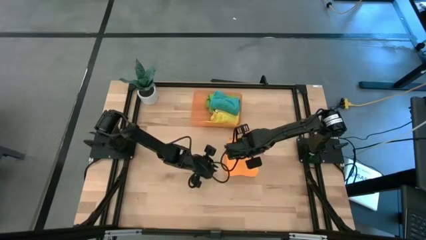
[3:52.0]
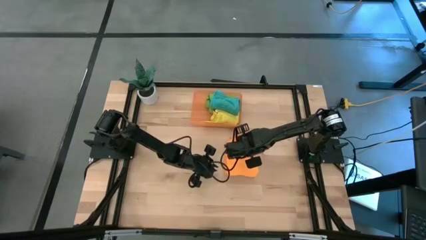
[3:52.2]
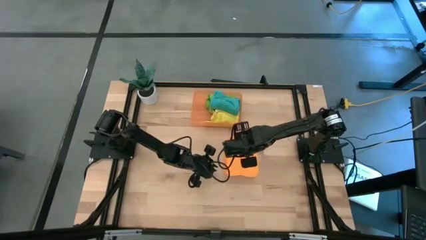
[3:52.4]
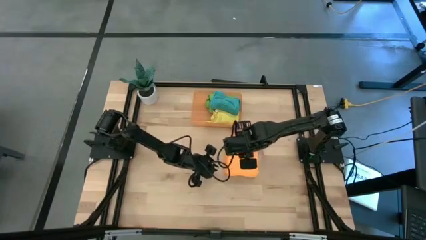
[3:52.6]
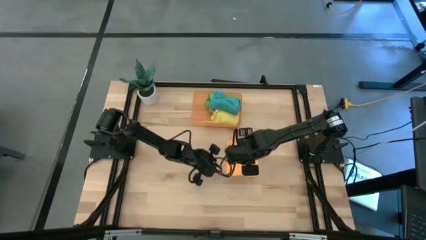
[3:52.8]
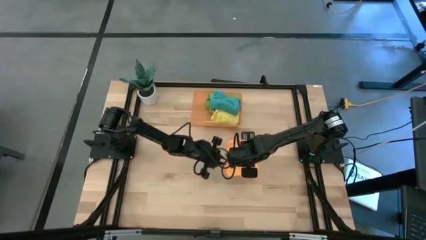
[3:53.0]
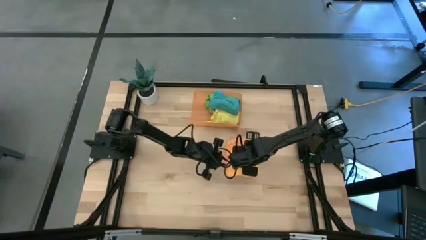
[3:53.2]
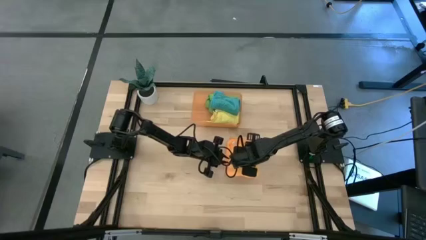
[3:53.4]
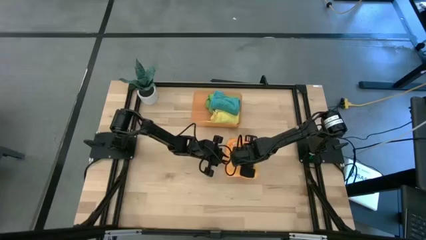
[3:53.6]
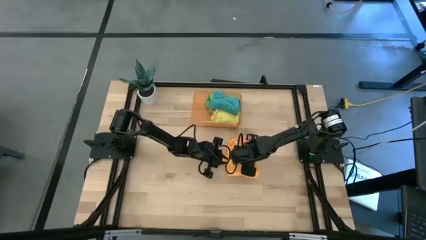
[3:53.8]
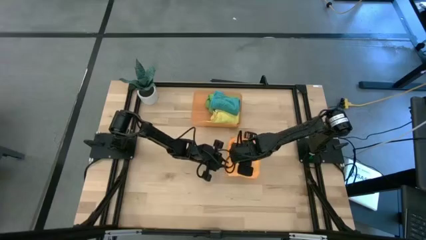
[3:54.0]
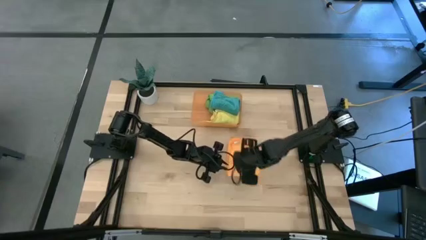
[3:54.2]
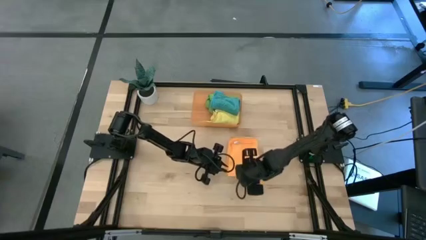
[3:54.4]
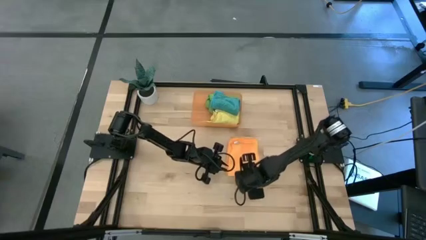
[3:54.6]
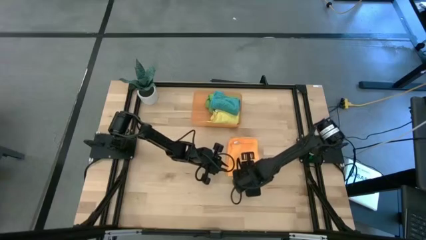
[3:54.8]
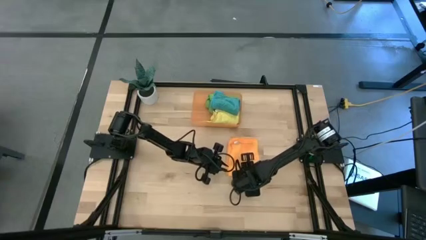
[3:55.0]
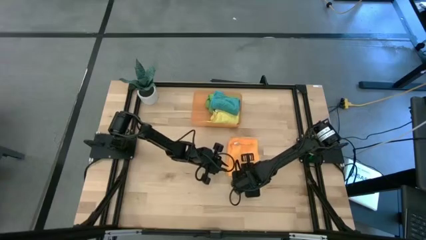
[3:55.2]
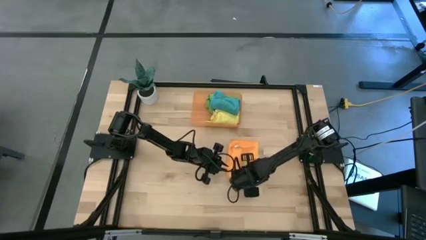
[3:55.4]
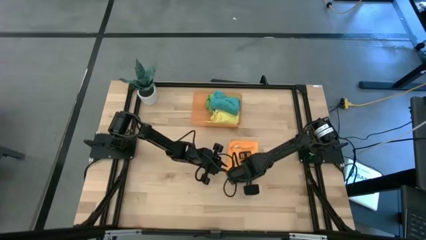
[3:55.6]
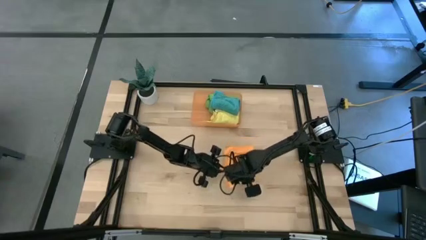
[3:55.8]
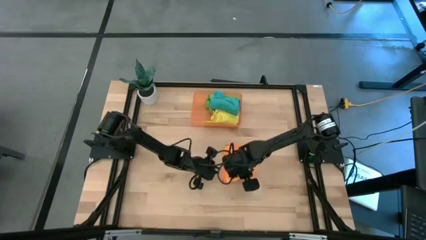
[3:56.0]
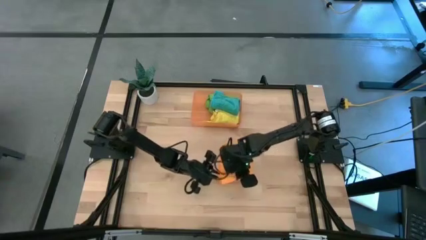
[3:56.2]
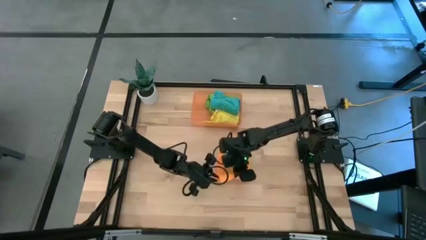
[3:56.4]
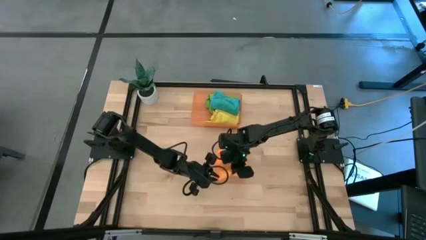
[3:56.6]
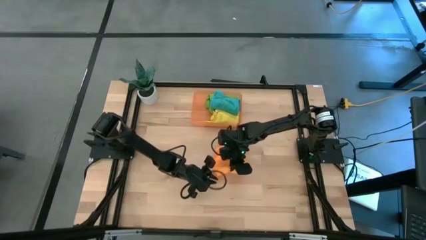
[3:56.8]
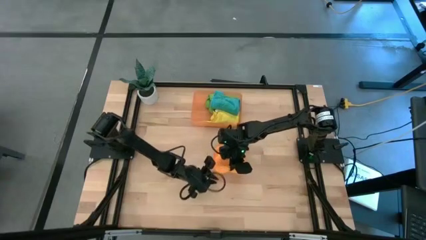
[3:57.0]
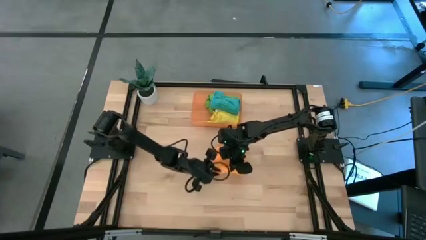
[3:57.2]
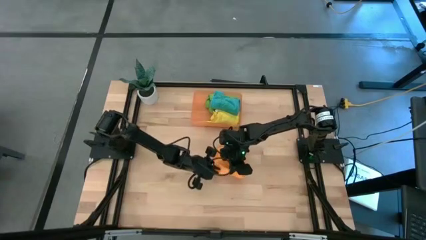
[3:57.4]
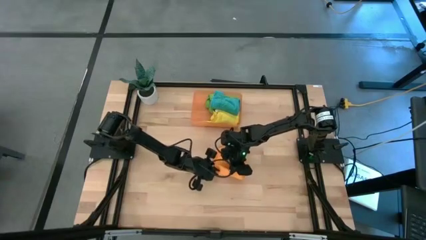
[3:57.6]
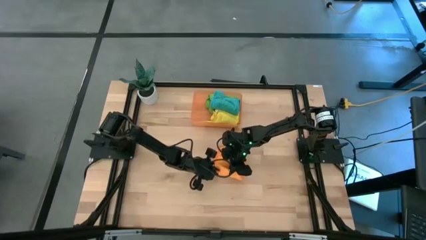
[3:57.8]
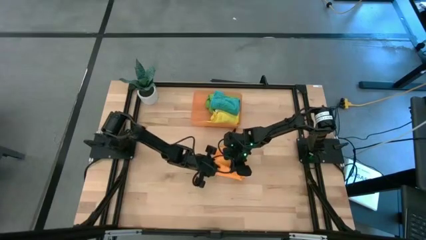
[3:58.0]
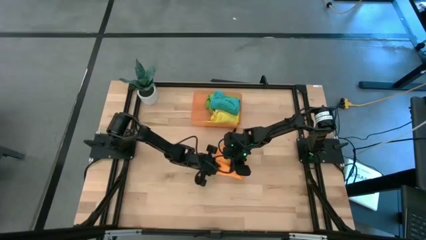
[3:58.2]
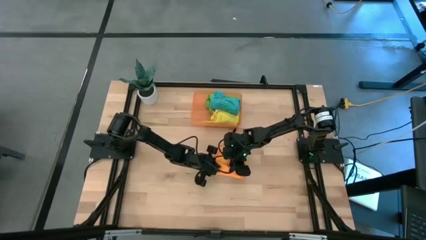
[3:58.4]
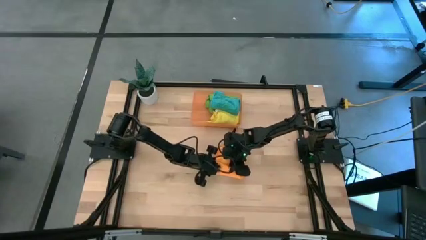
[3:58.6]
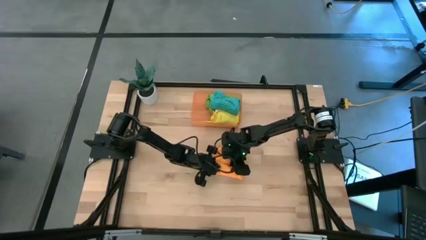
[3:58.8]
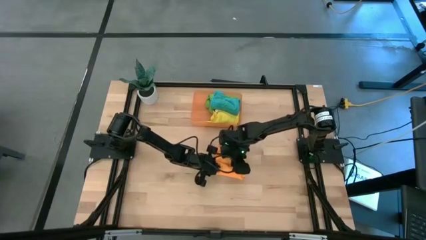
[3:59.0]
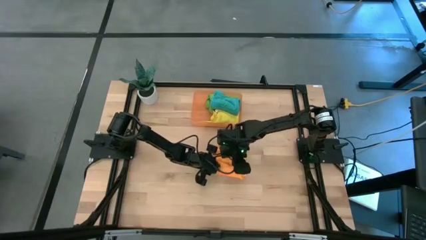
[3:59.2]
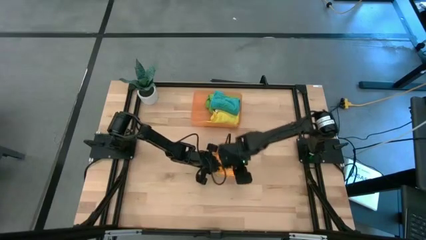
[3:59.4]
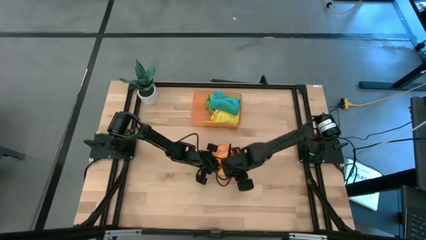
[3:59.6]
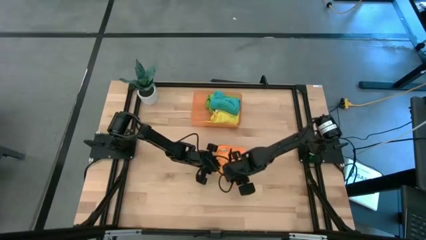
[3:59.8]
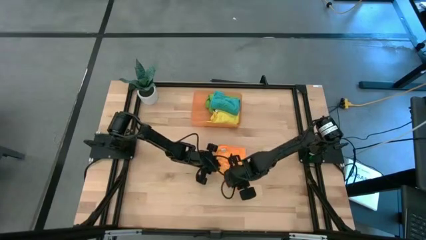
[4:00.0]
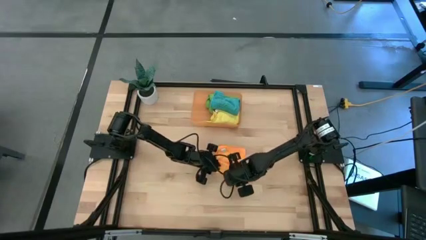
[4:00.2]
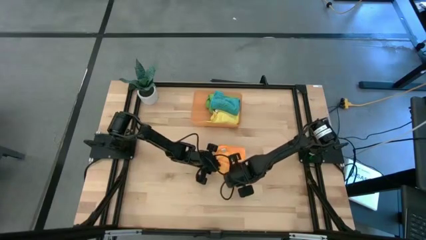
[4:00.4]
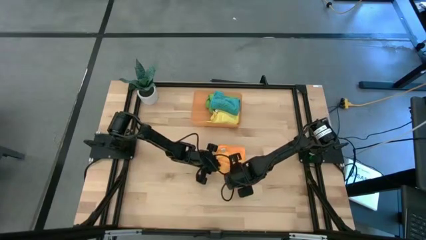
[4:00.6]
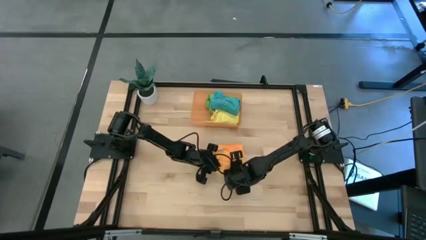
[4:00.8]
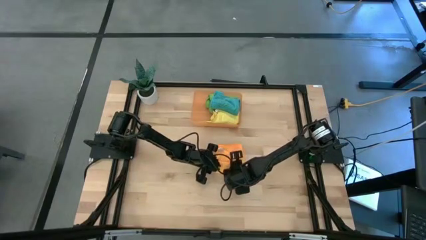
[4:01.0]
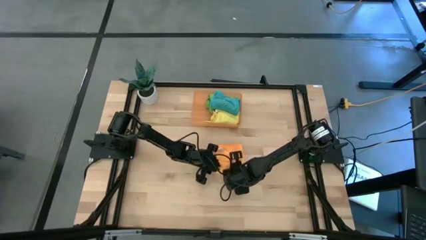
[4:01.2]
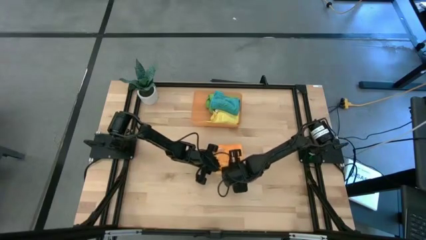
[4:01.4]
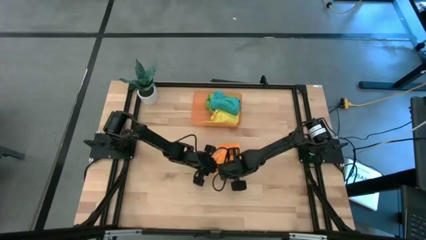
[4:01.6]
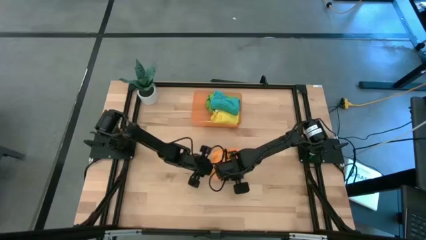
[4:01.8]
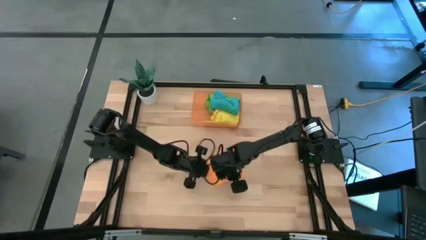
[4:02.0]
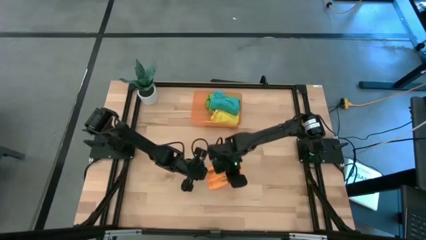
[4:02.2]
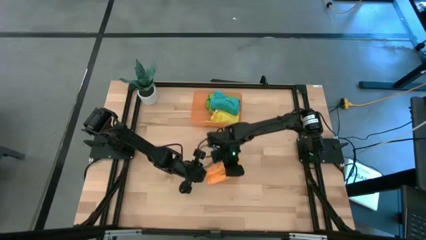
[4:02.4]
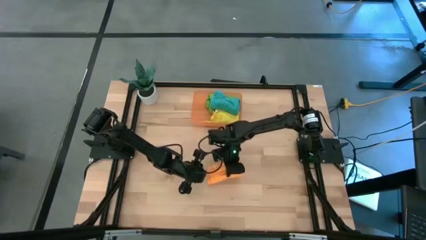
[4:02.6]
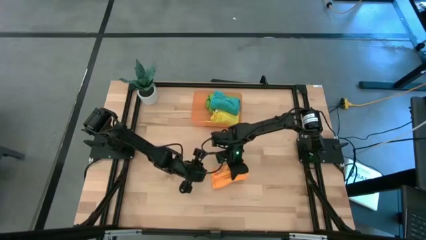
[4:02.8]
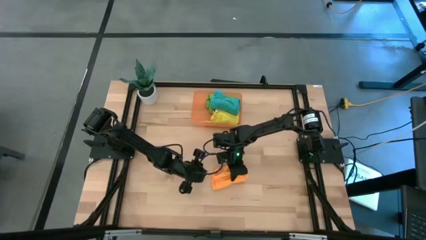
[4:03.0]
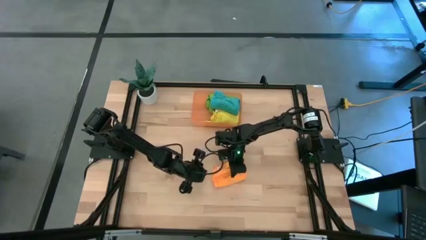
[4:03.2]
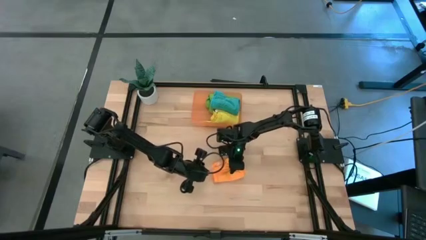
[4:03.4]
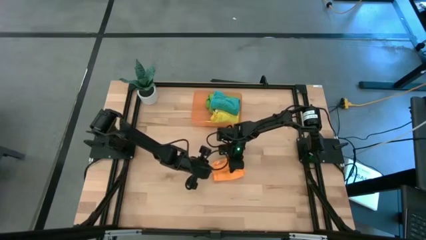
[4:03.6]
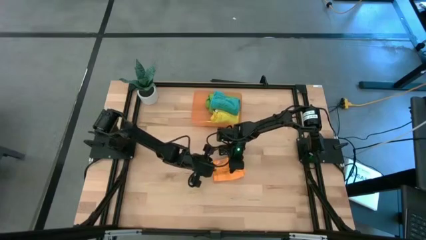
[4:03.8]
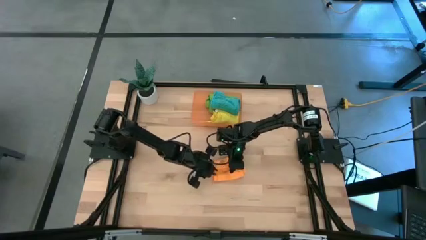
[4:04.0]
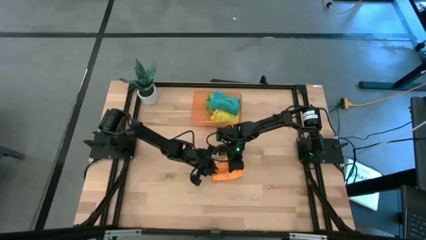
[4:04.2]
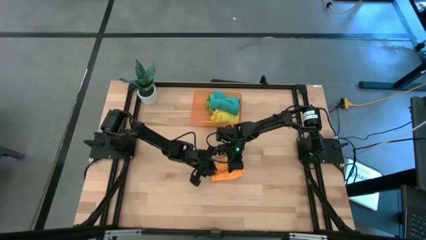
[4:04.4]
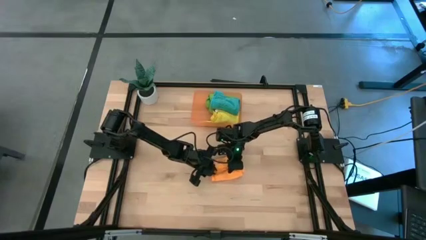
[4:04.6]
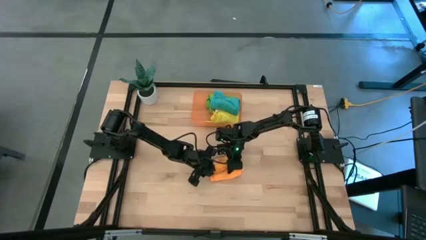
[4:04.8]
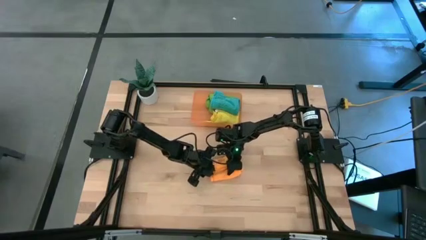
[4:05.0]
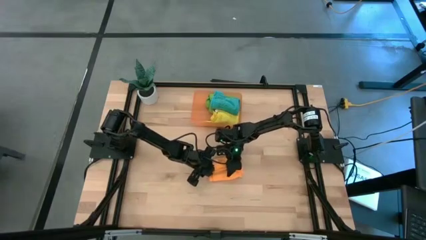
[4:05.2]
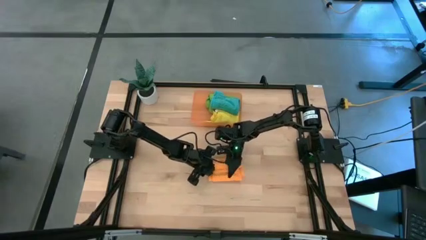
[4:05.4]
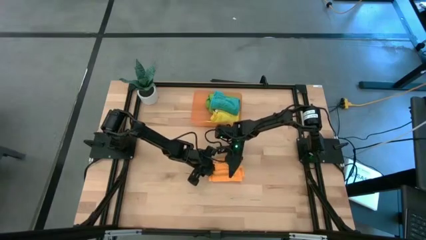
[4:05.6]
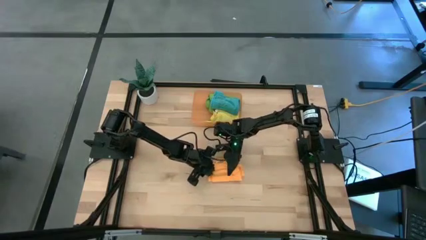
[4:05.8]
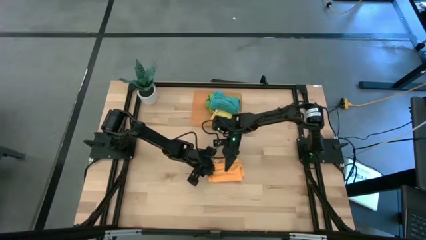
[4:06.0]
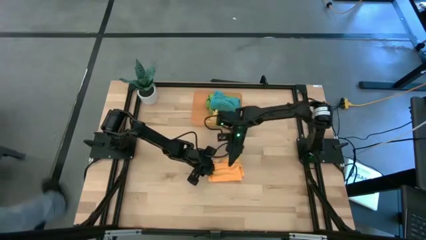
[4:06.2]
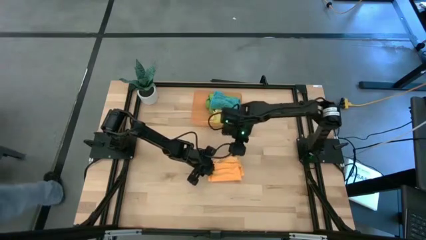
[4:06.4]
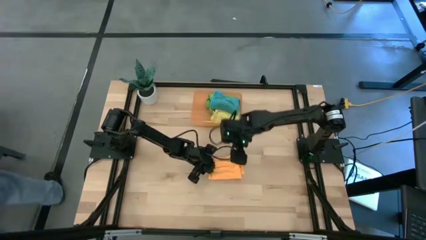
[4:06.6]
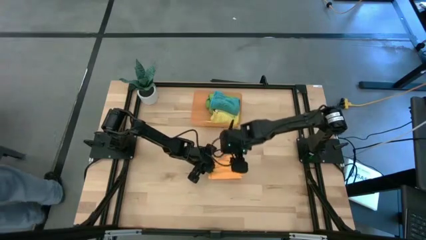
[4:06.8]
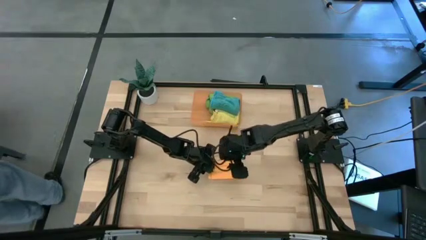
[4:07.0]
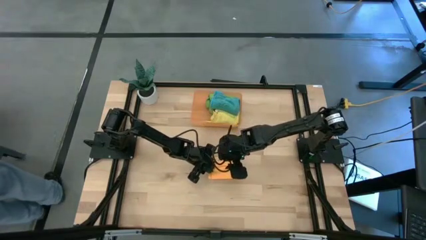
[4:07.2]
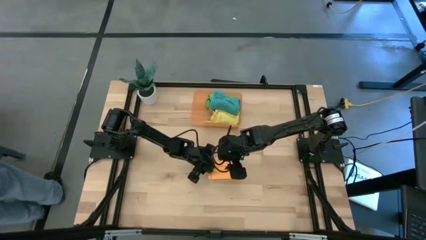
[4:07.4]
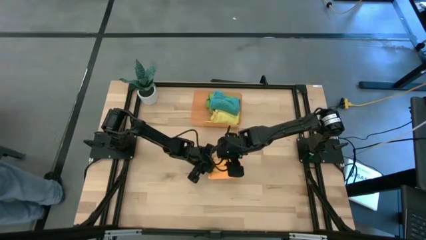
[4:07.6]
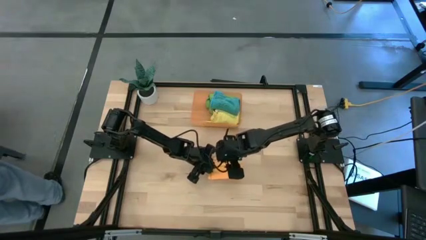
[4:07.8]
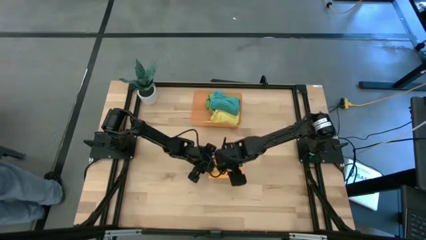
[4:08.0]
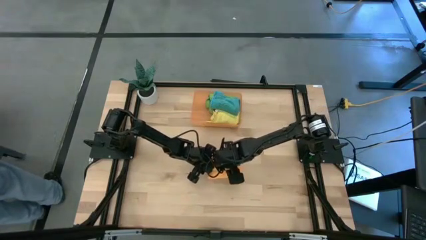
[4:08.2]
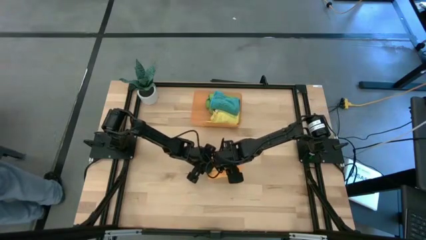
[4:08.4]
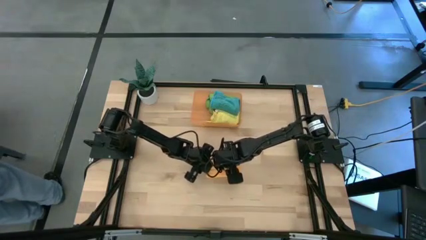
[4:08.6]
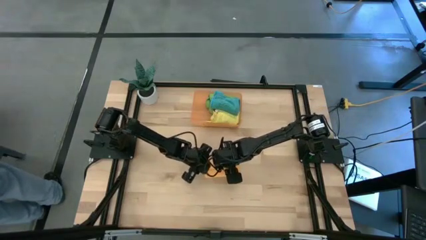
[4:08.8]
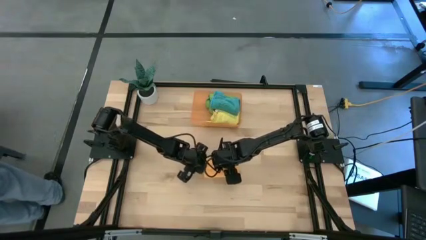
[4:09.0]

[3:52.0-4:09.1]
Task: Roll microfiber towels into tight, uniform cylinder then place into a basket
Roll the orange microfiber cloth
